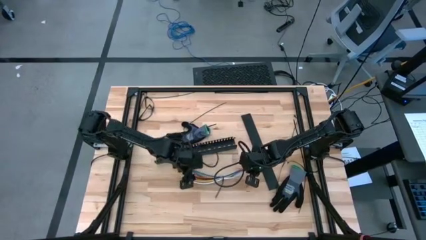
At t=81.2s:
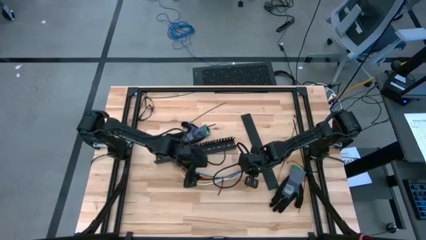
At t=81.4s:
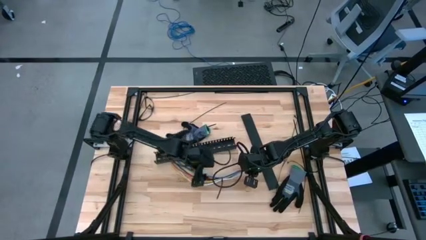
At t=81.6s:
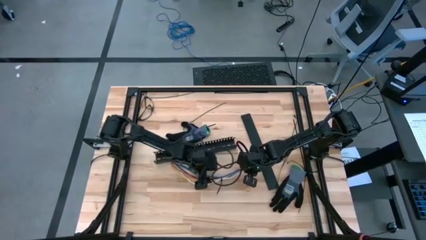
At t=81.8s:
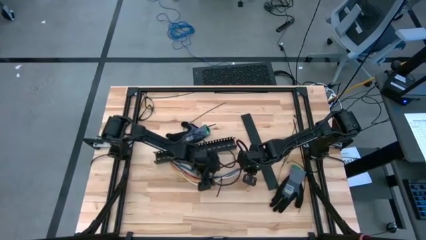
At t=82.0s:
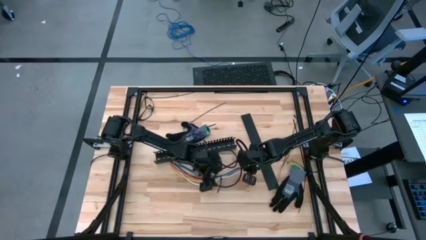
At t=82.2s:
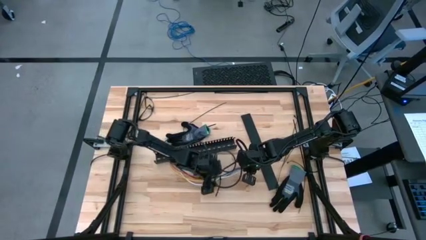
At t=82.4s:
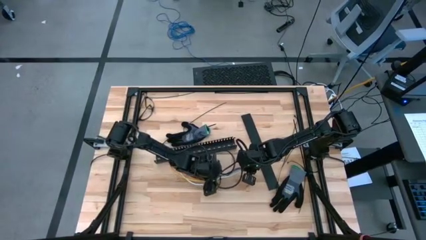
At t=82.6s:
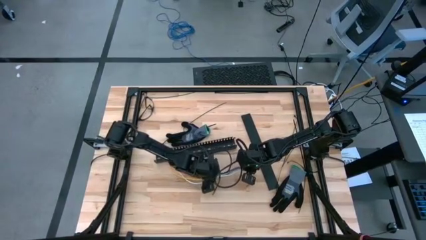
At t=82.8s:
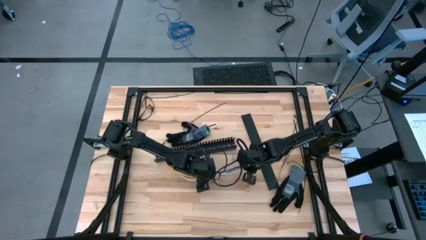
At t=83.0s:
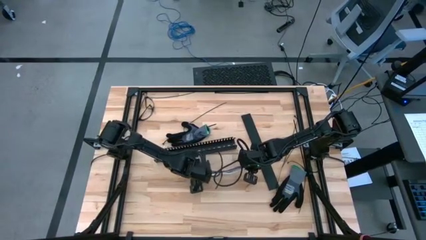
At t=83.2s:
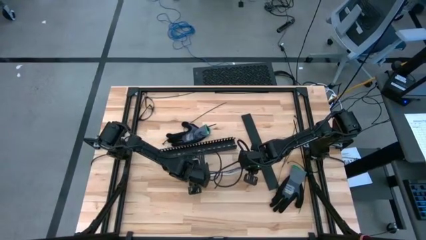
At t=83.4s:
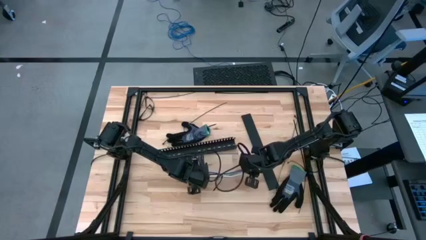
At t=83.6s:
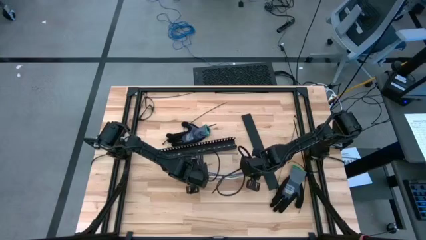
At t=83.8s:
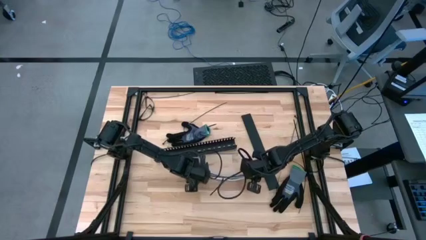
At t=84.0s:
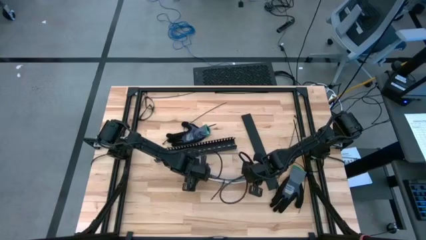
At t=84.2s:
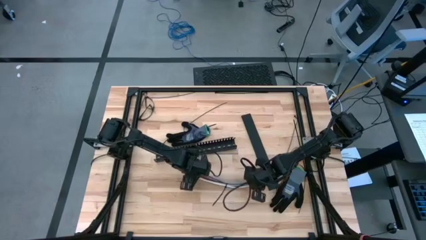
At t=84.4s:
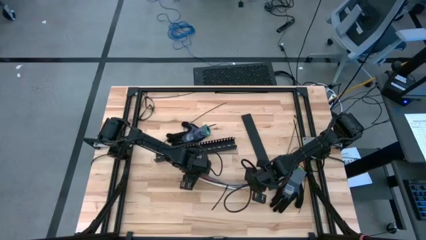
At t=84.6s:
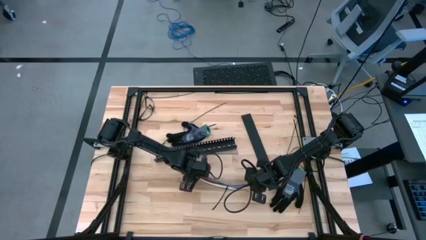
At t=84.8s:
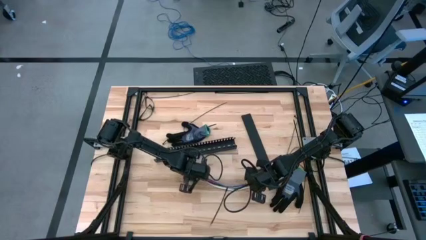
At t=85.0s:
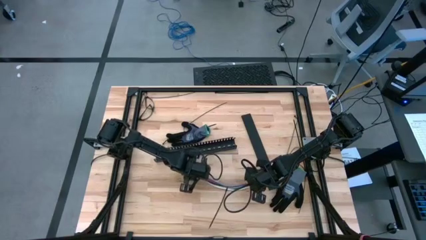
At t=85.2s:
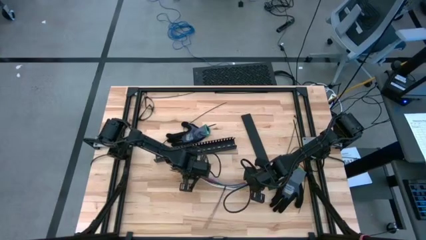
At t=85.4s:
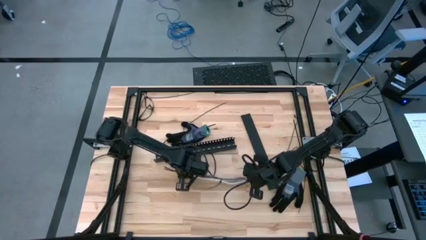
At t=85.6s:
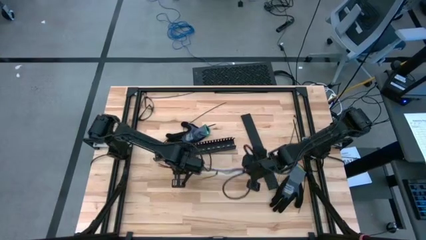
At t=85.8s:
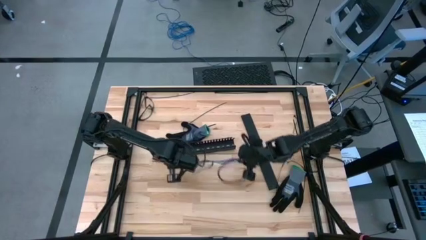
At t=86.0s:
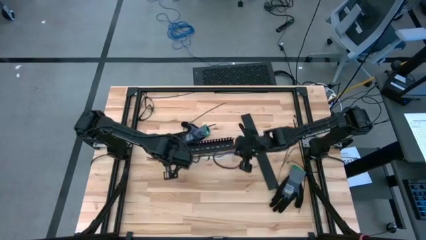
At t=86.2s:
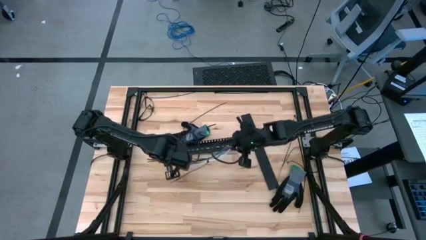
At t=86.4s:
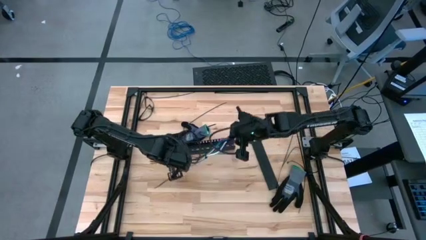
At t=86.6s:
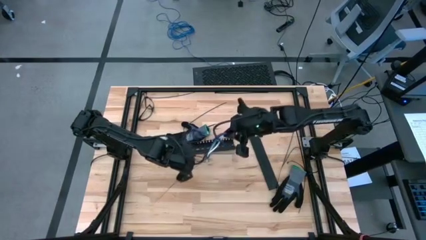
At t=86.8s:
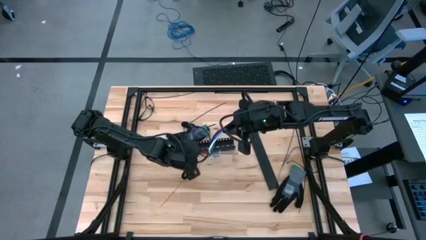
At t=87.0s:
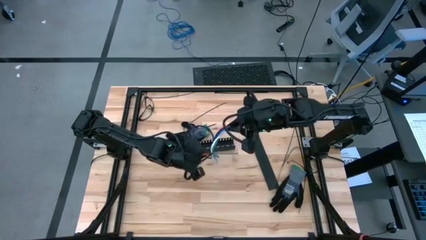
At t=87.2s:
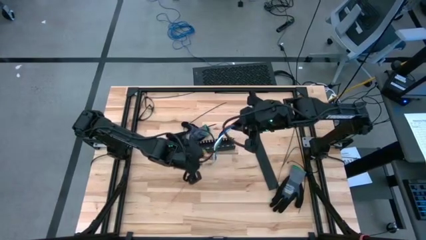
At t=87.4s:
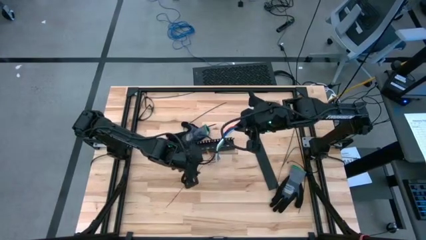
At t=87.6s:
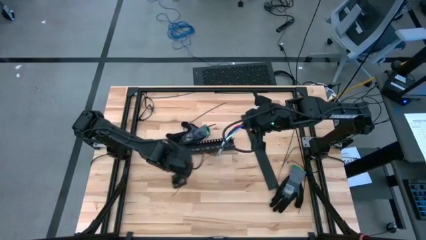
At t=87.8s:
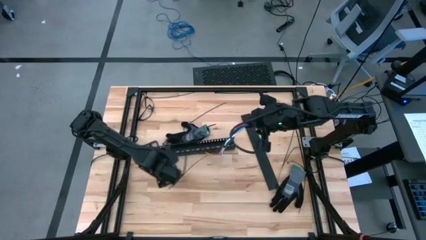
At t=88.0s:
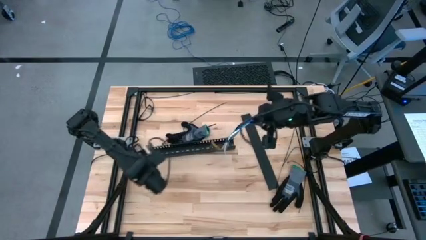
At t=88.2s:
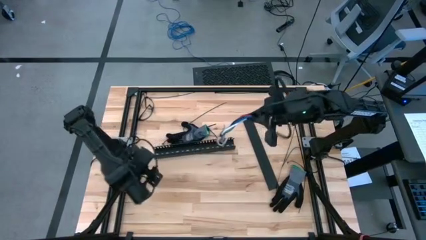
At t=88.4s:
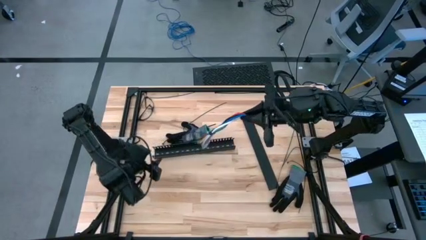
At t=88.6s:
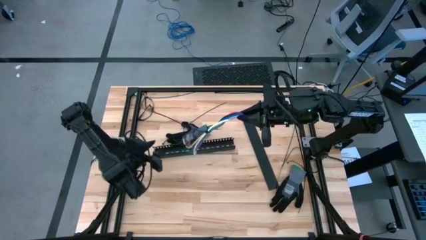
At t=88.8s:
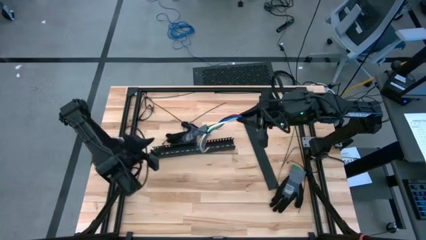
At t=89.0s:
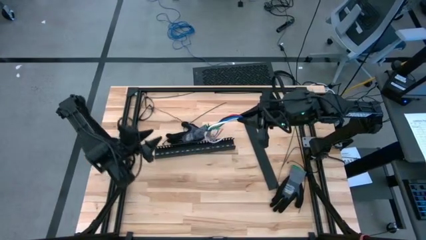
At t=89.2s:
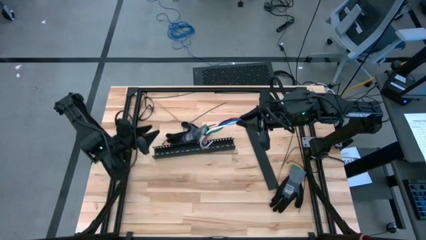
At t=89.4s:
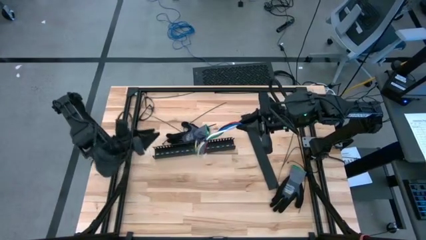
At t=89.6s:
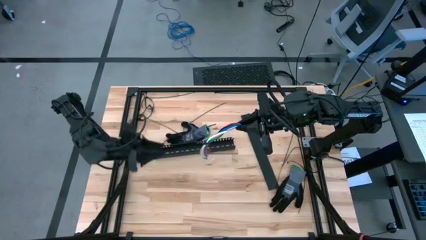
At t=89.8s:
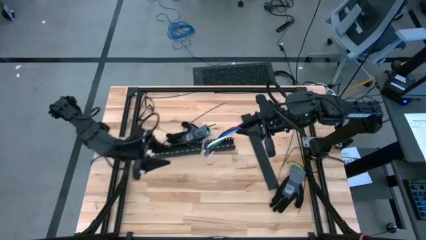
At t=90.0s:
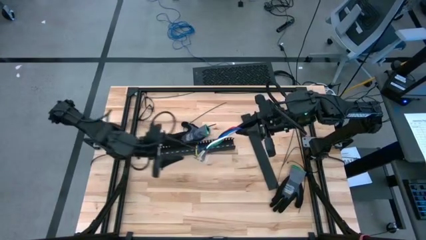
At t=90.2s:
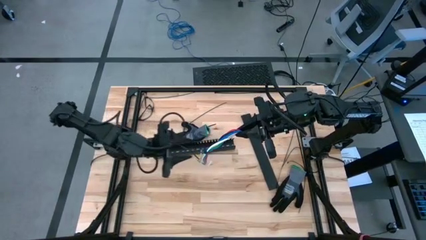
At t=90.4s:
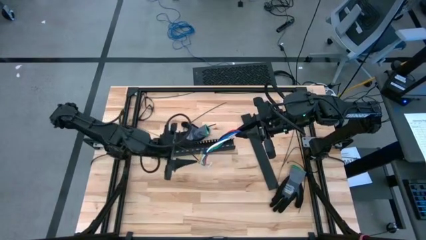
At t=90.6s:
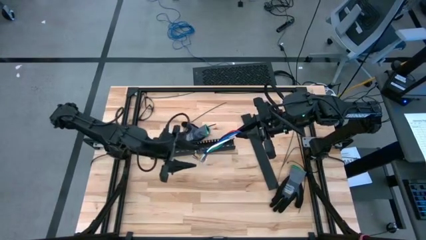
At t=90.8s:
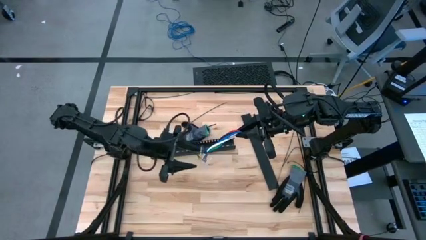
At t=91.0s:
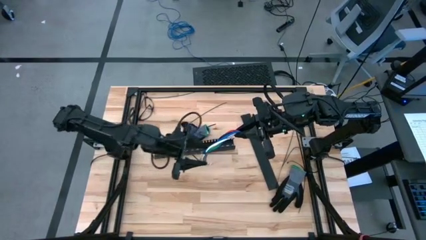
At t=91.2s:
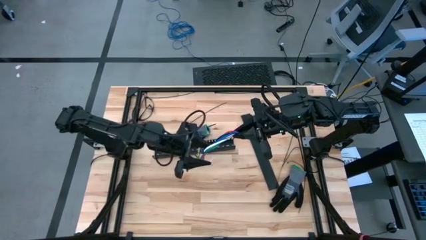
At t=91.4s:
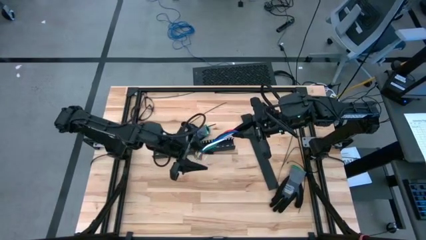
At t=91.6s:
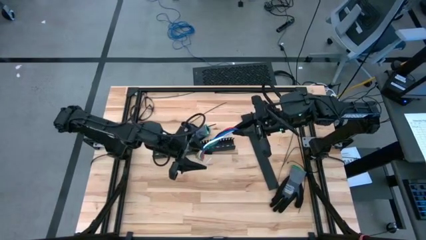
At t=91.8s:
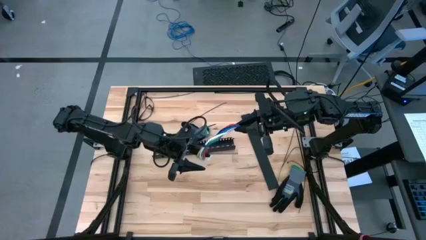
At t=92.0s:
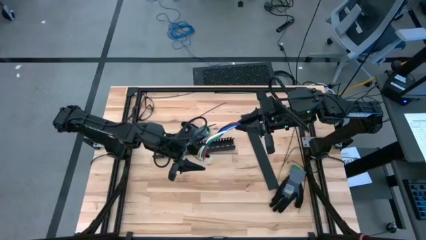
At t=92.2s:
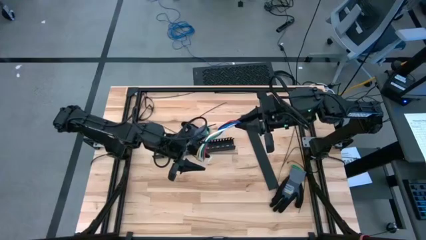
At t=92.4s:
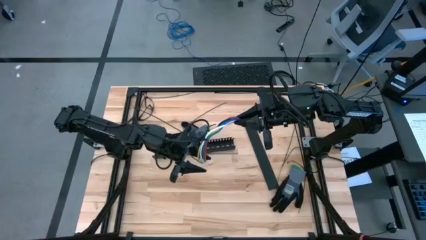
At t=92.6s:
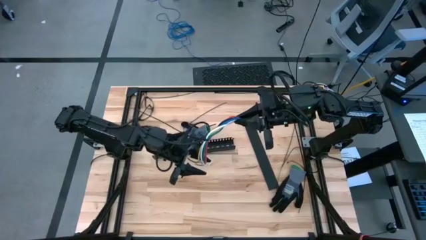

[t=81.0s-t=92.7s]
Task: Ziptie cables
Put the cable wires into the black cable duct
